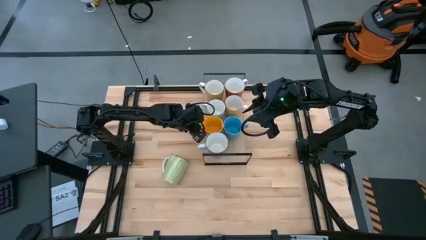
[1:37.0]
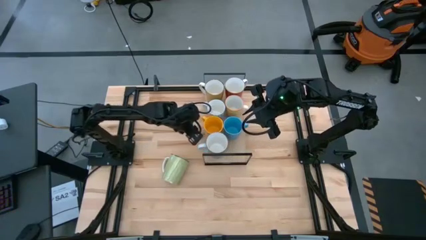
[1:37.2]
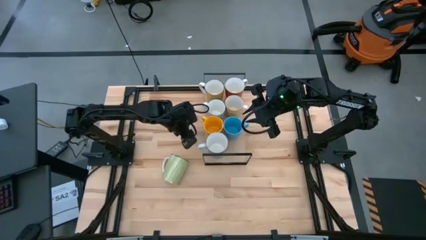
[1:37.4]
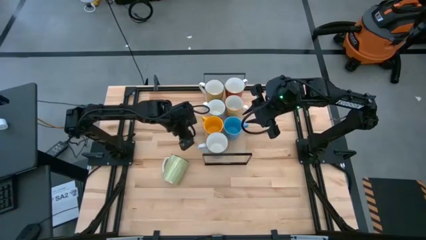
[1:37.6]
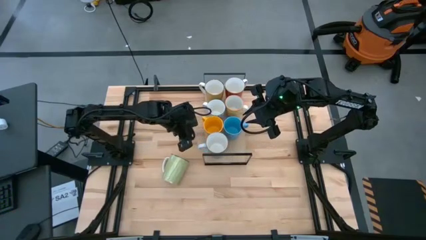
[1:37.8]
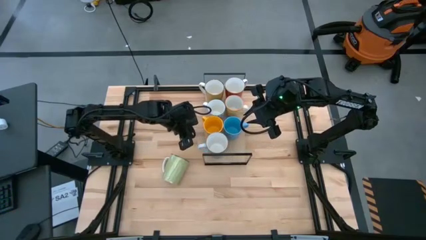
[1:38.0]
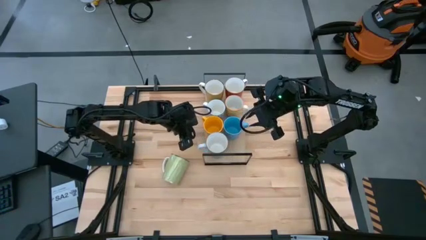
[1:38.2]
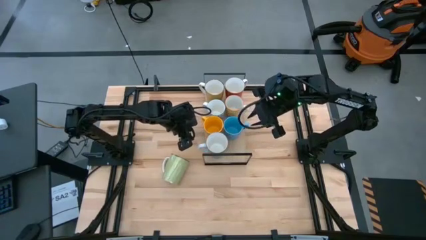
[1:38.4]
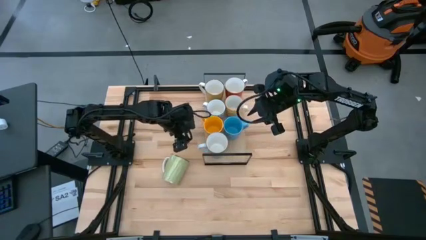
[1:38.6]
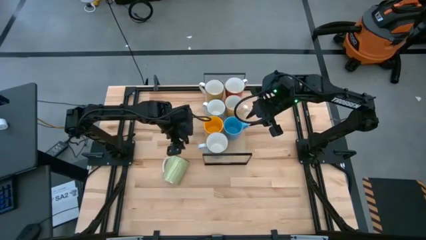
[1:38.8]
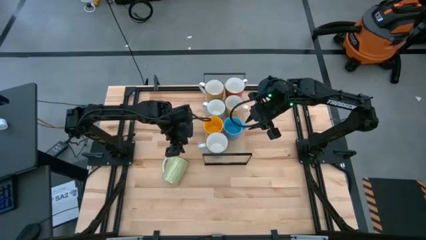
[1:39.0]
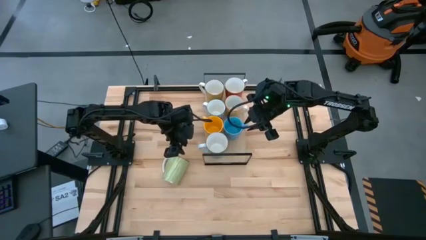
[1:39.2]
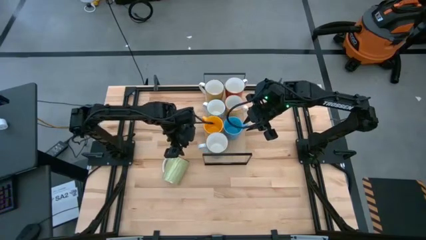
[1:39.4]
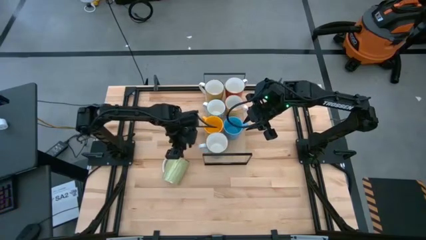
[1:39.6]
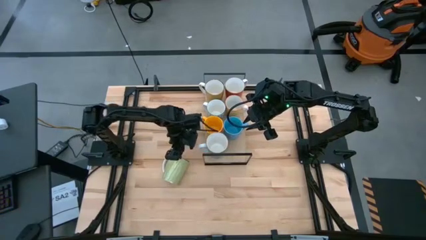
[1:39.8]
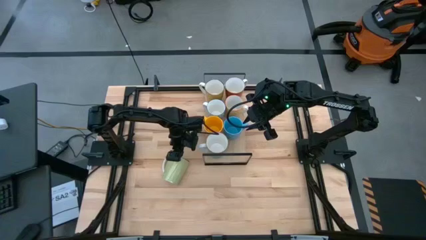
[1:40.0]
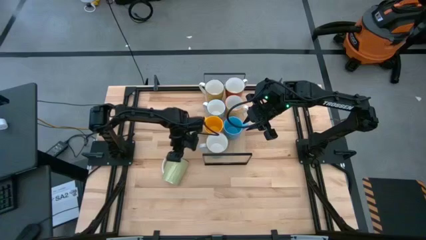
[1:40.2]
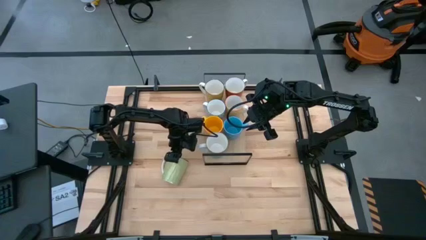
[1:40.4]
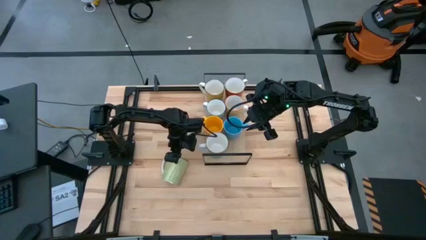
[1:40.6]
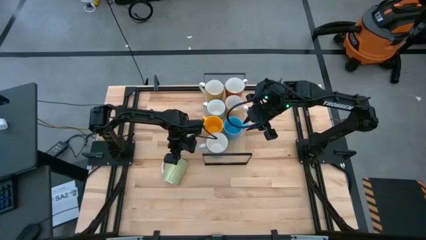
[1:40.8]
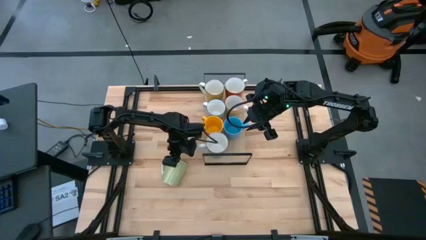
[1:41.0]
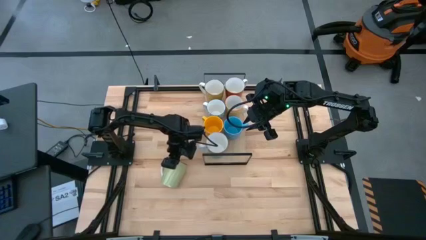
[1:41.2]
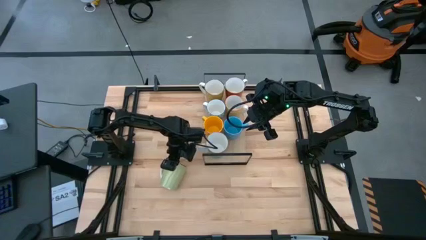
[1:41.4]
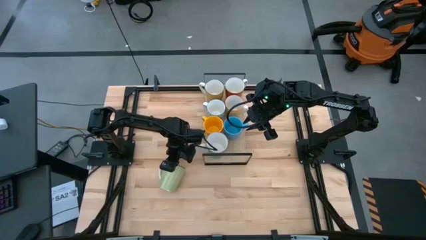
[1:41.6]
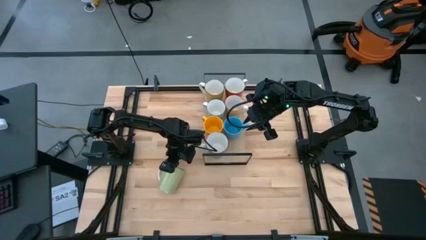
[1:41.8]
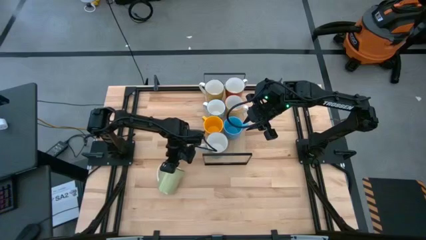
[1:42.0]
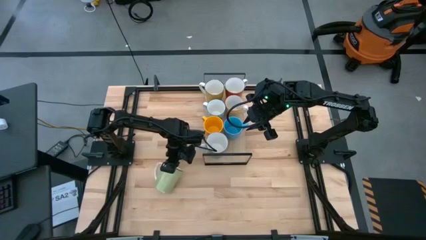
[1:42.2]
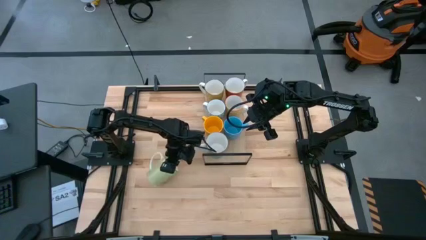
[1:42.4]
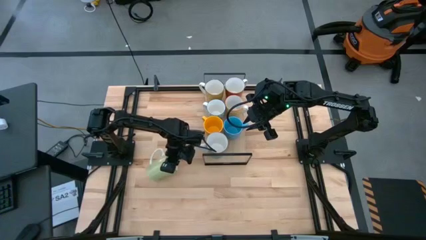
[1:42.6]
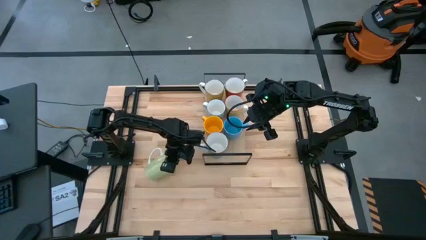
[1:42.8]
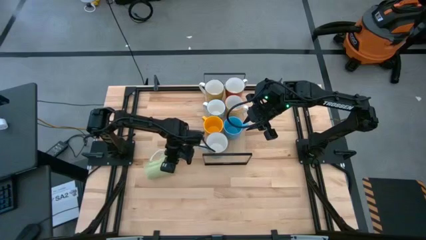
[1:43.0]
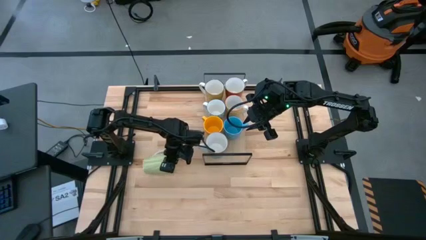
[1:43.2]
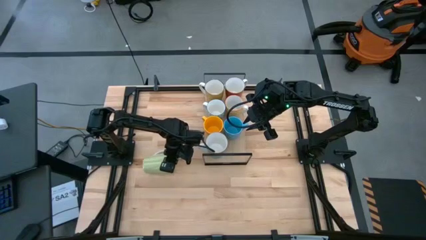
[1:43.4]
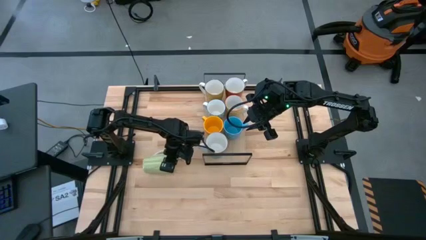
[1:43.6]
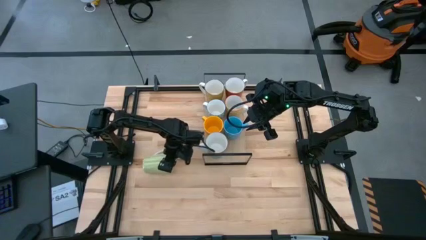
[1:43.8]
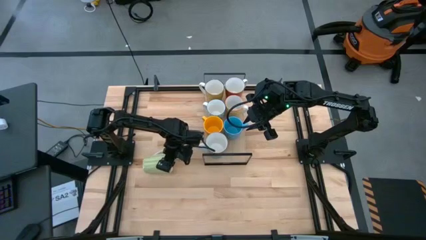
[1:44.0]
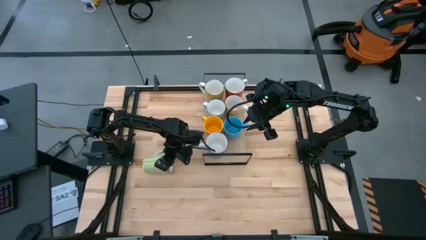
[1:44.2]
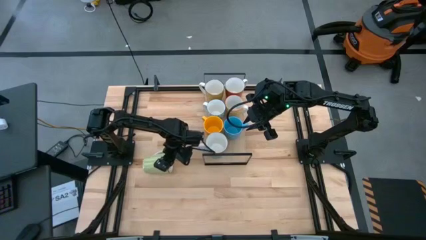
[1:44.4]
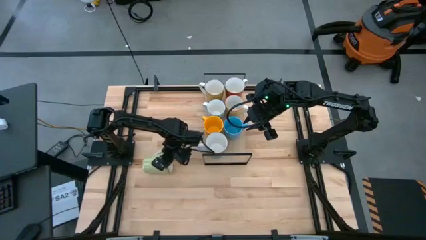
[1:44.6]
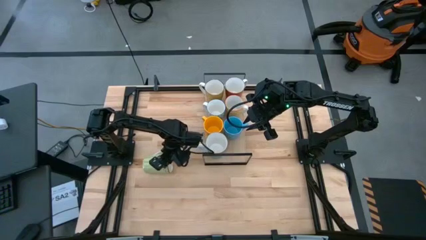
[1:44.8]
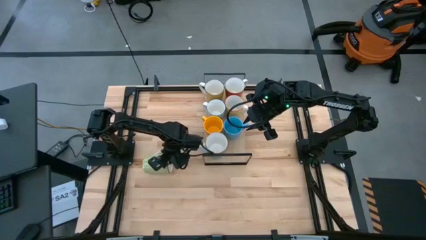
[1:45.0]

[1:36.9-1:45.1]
Task: Place coffee mugs
Put the green mug on the shelf

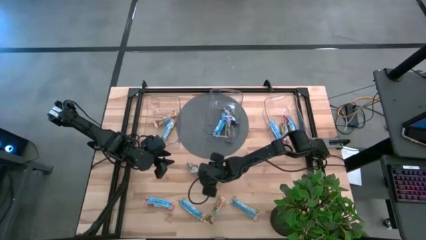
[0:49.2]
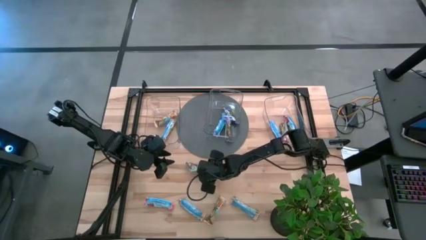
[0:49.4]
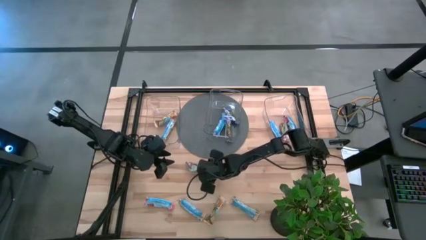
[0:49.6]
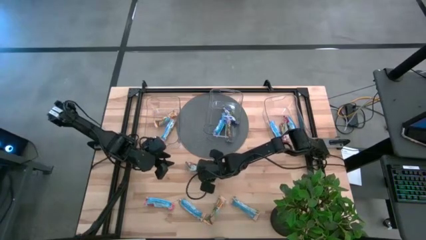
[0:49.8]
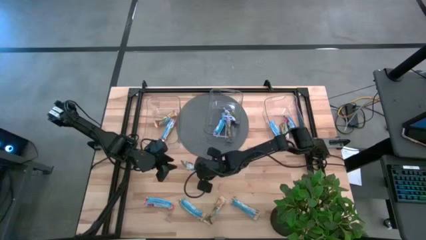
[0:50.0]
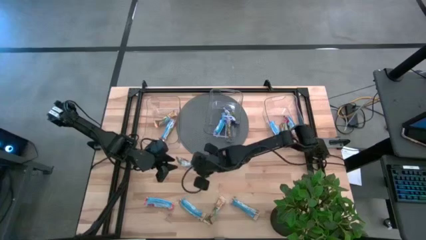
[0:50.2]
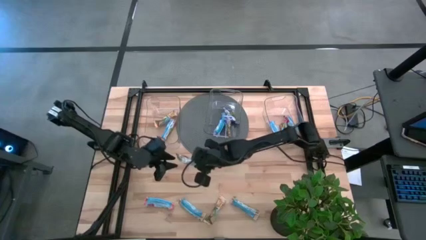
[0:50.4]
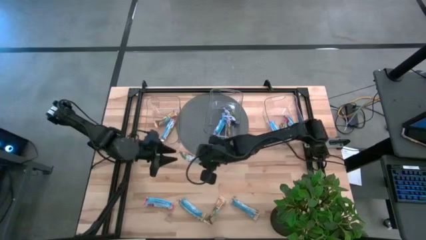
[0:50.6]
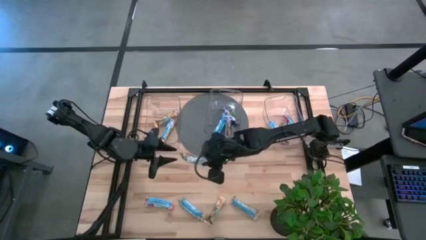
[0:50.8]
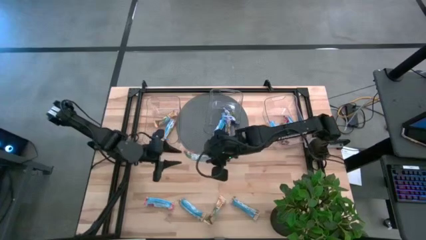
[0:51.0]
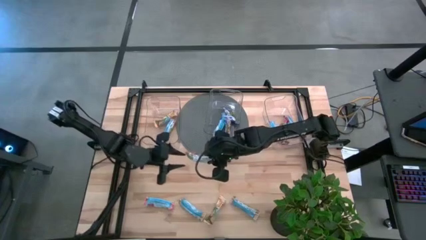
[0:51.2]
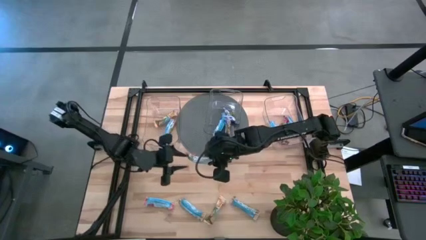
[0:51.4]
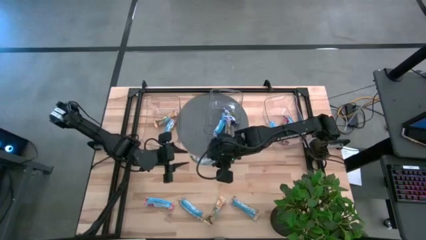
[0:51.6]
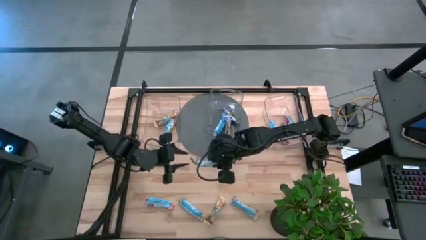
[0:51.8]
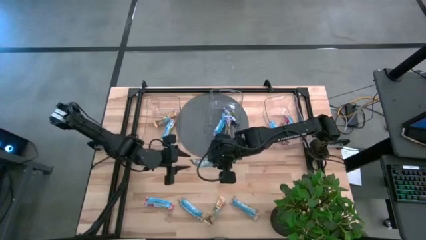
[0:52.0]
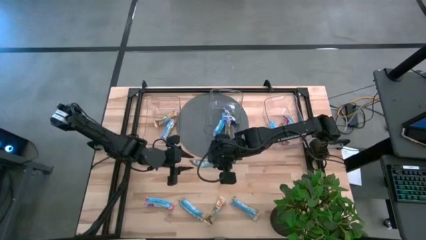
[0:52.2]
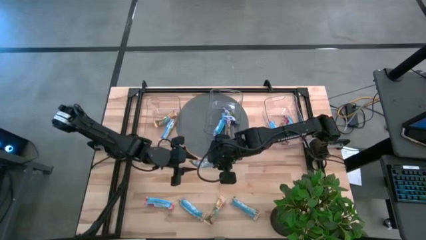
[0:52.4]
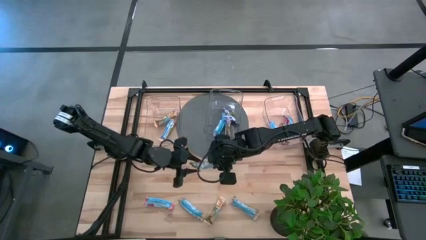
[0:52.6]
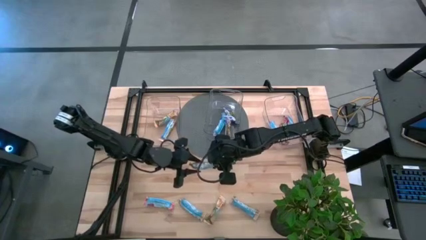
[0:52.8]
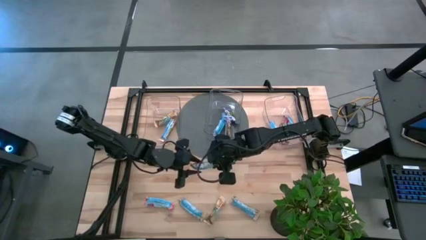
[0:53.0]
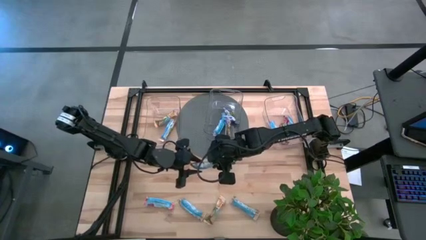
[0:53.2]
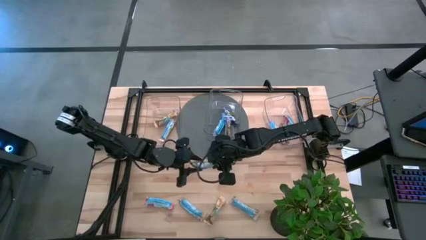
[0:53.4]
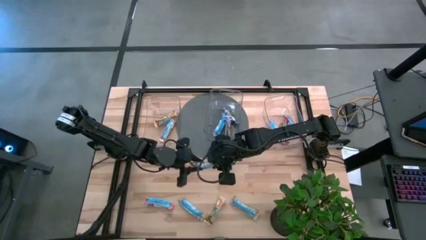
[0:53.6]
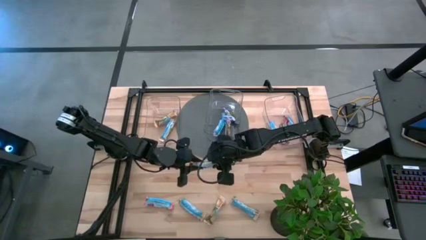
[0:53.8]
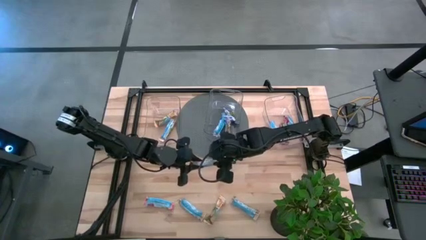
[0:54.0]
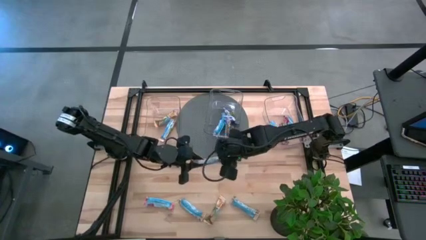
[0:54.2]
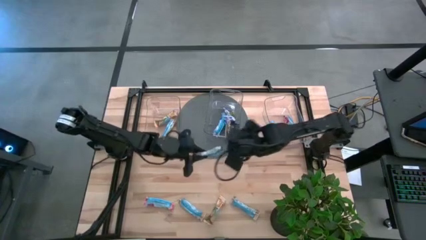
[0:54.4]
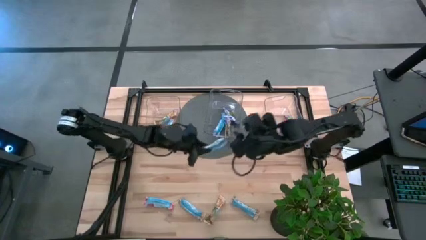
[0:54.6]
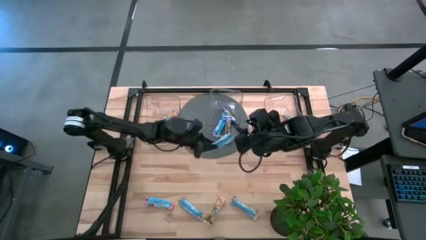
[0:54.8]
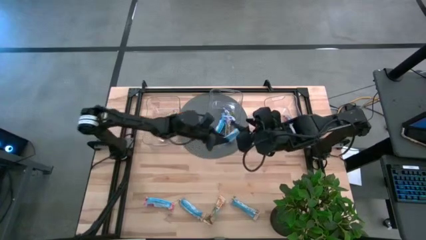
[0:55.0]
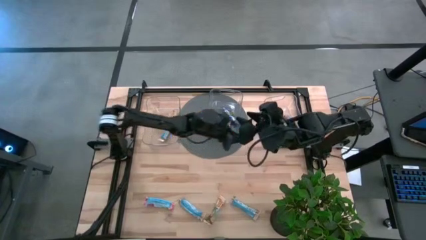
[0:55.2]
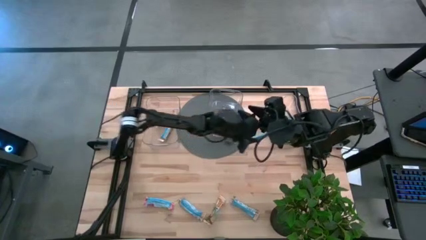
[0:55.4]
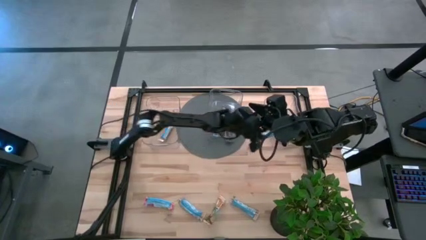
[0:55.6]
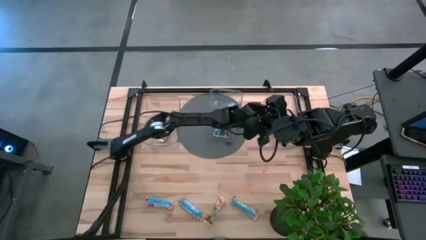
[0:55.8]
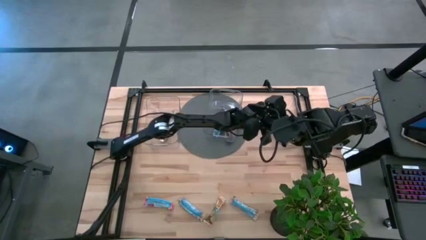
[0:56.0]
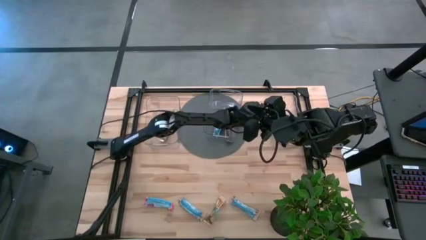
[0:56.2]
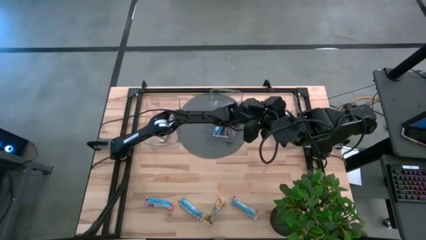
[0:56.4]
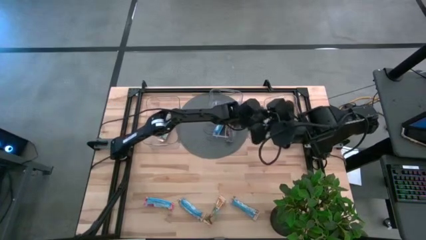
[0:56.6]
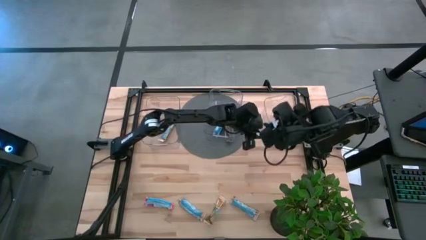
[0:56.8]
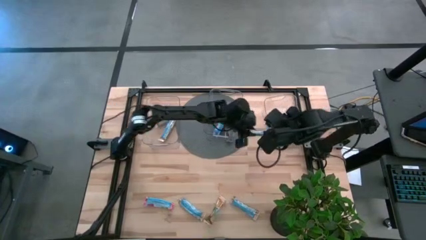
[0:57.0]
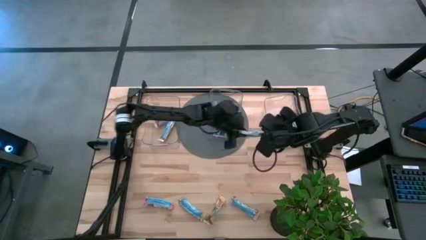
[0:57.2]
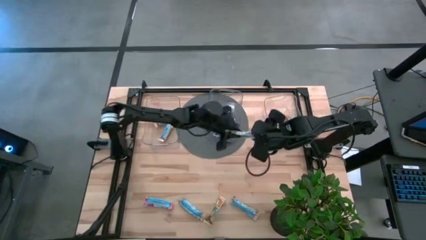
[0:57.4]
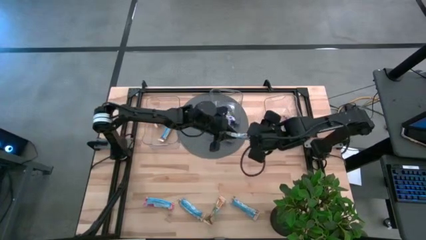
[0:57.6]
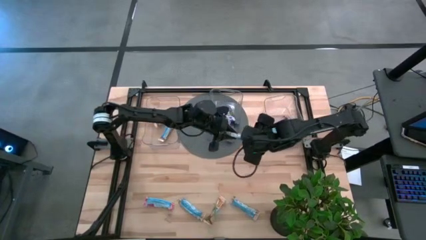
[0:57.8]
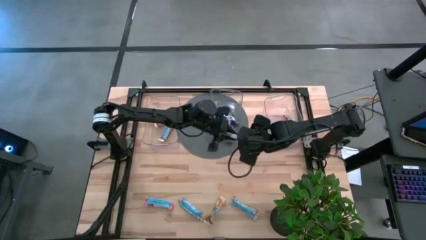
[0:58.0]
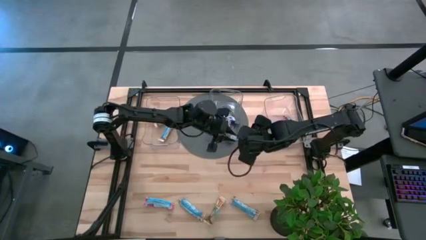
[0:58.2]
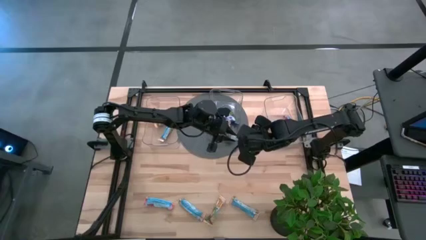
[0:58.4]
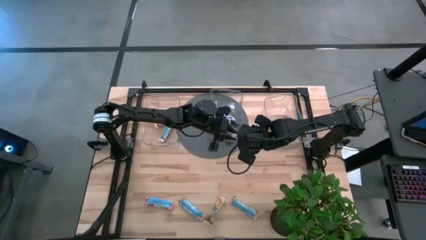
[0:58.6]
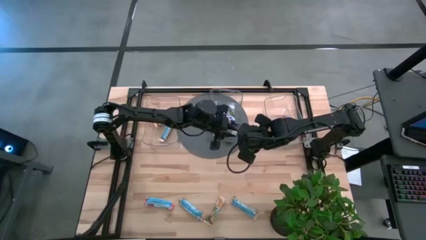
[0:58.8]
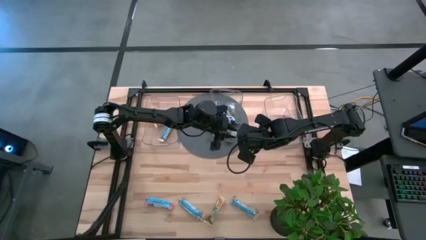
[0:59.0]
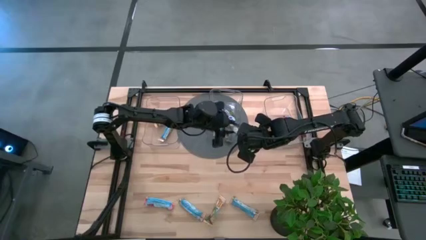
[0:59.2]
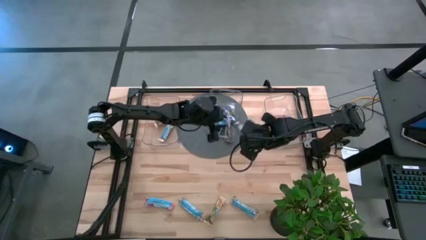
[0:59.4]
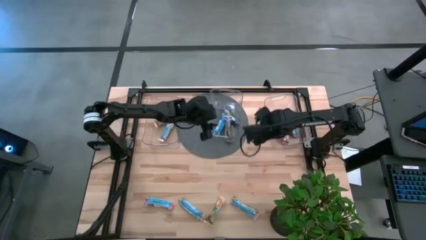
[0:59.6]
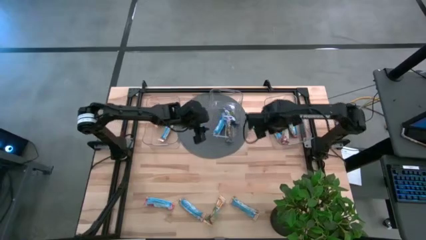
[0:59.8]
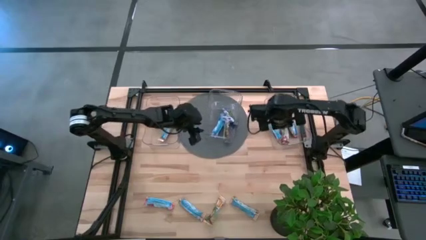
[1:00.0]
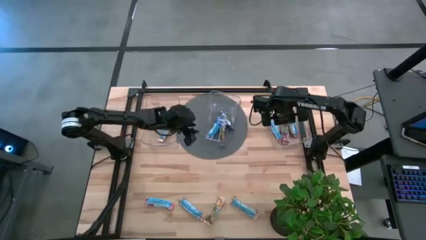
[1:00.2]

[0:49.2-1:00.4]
Task: Pick and place Granola Bars by type
Put the red granola bar into the right transparent bin
